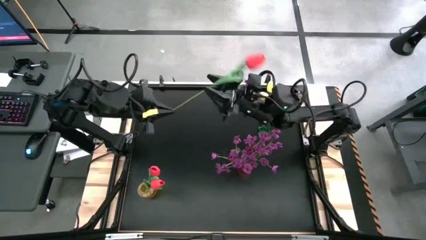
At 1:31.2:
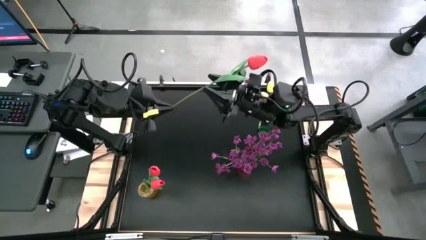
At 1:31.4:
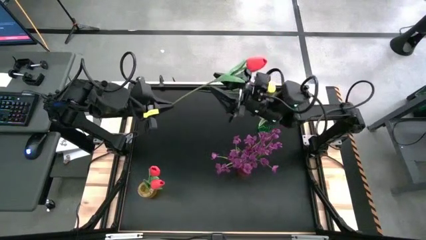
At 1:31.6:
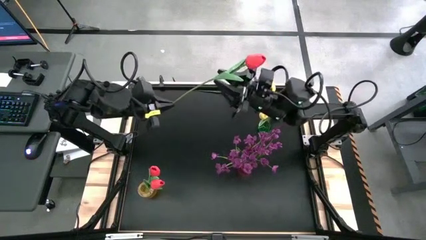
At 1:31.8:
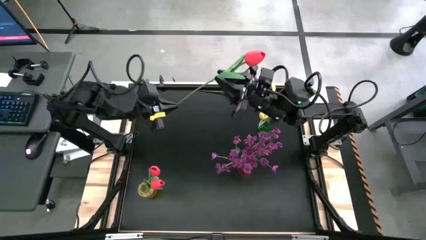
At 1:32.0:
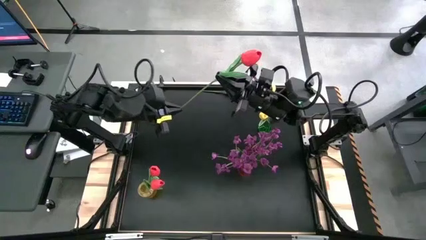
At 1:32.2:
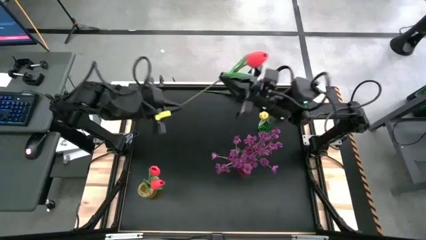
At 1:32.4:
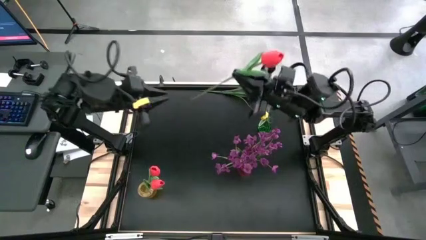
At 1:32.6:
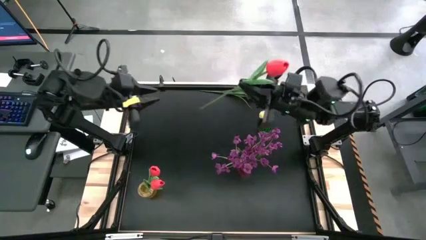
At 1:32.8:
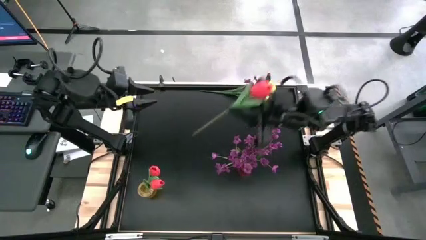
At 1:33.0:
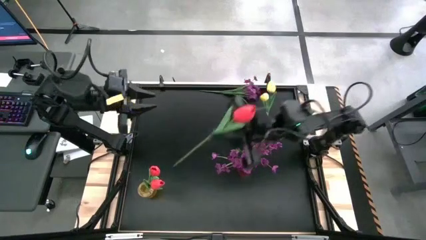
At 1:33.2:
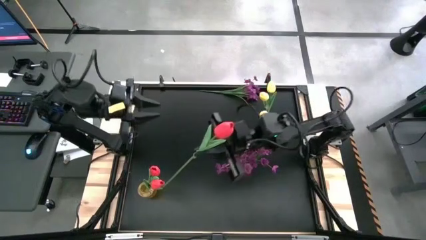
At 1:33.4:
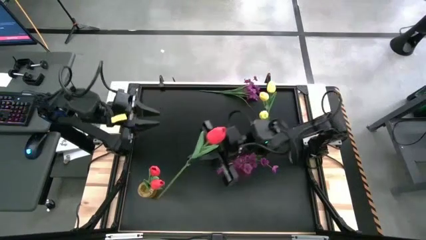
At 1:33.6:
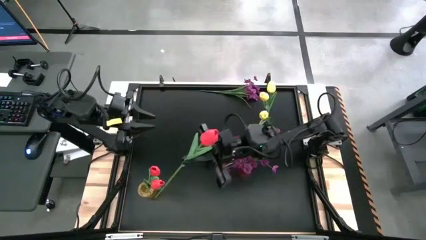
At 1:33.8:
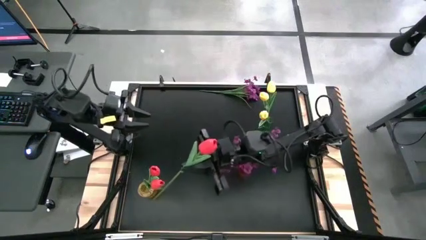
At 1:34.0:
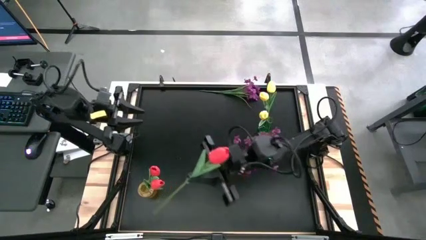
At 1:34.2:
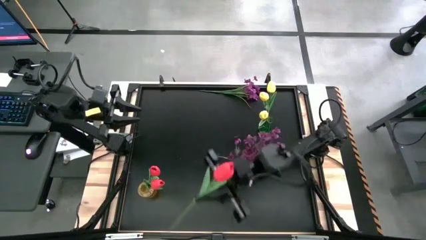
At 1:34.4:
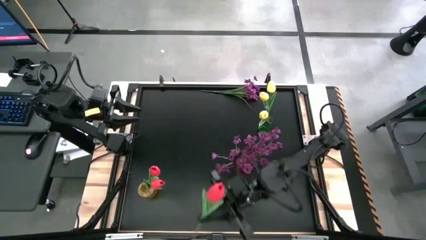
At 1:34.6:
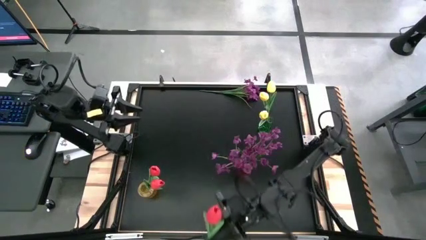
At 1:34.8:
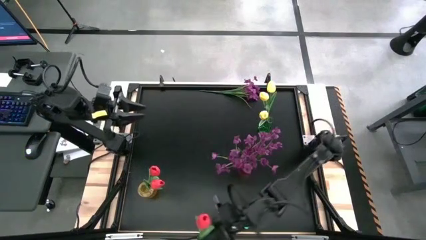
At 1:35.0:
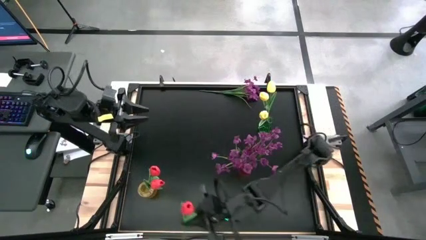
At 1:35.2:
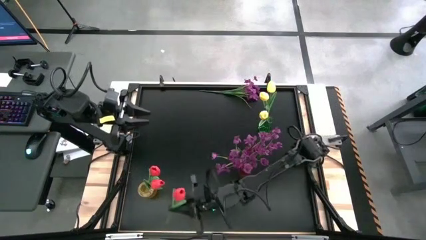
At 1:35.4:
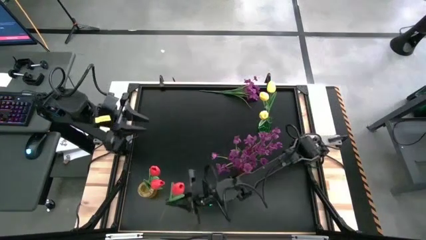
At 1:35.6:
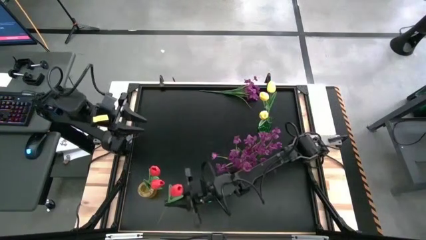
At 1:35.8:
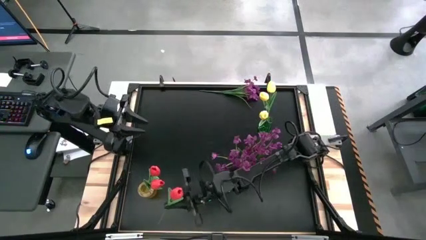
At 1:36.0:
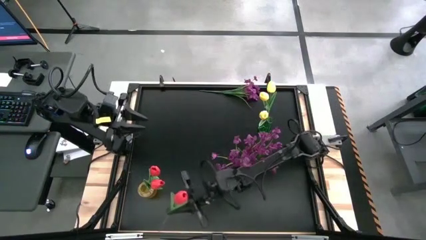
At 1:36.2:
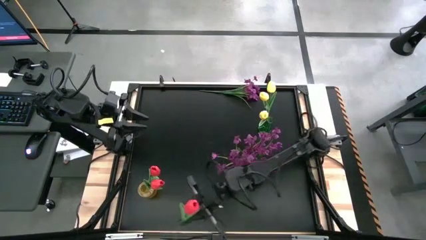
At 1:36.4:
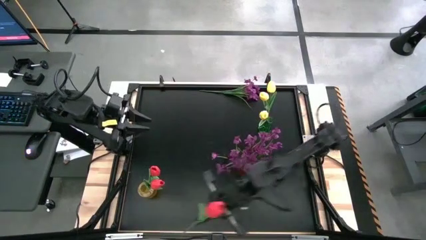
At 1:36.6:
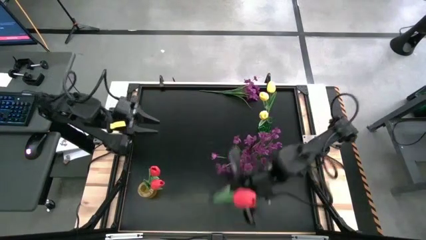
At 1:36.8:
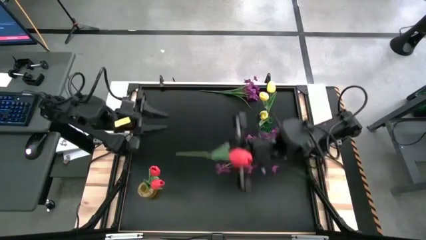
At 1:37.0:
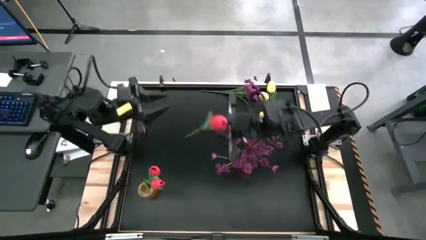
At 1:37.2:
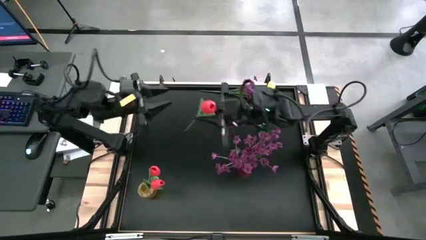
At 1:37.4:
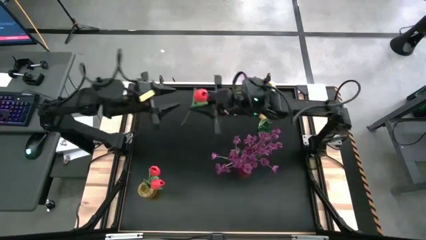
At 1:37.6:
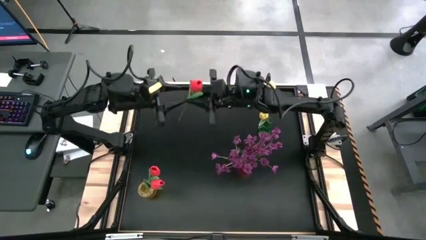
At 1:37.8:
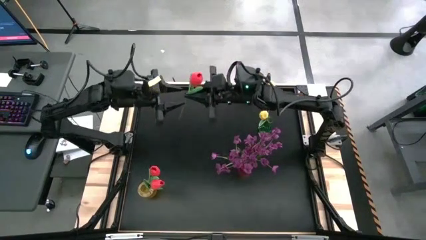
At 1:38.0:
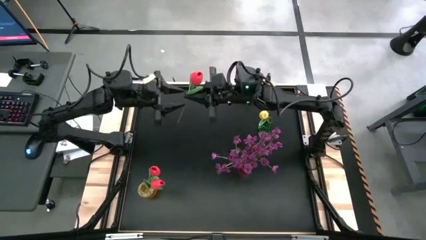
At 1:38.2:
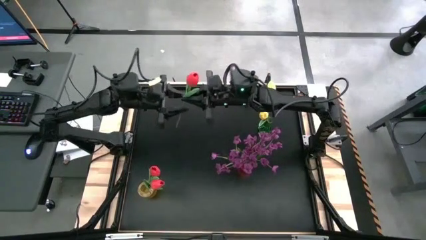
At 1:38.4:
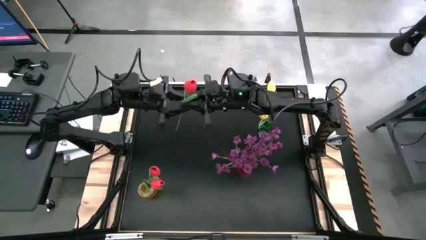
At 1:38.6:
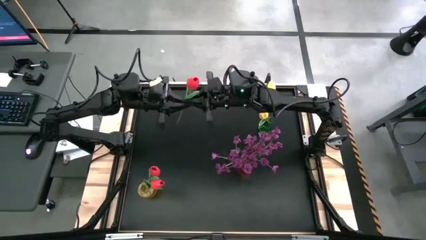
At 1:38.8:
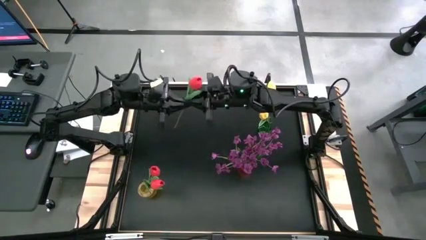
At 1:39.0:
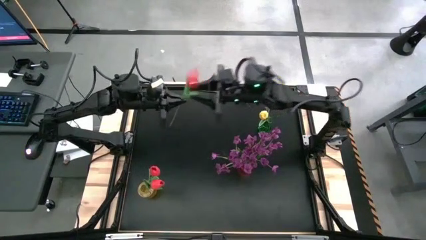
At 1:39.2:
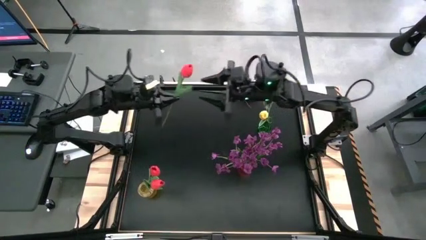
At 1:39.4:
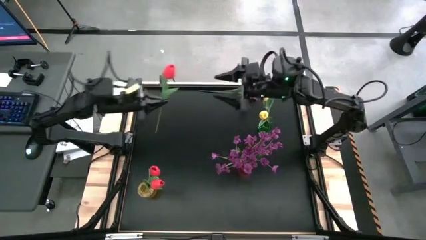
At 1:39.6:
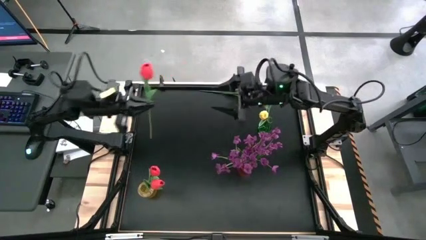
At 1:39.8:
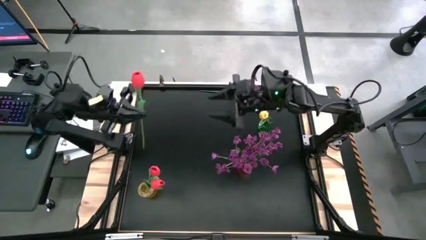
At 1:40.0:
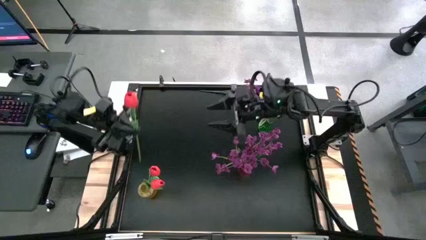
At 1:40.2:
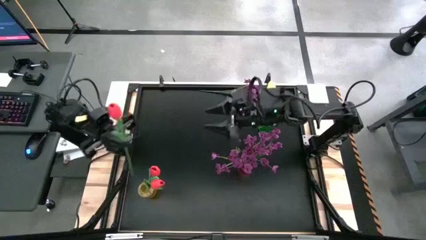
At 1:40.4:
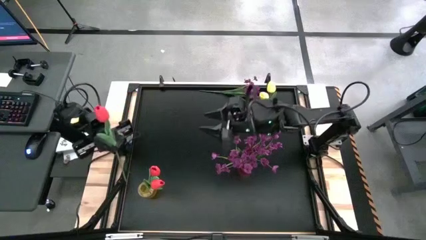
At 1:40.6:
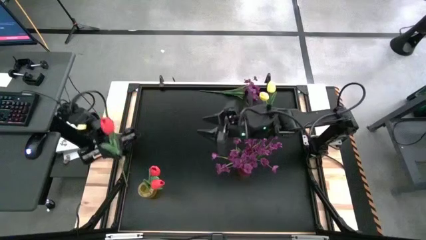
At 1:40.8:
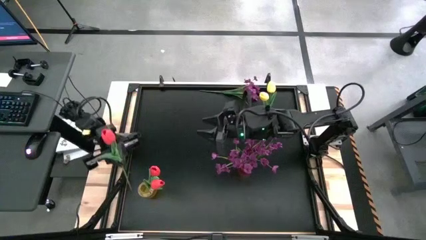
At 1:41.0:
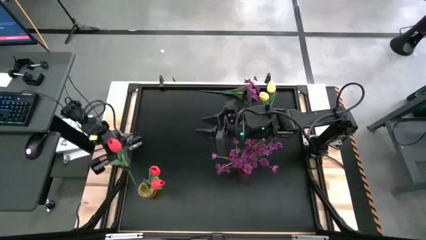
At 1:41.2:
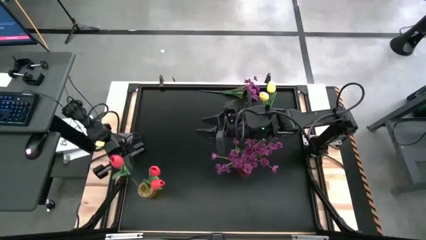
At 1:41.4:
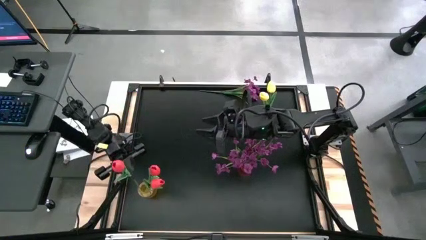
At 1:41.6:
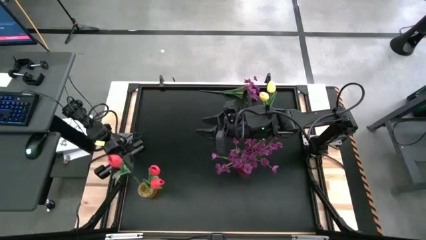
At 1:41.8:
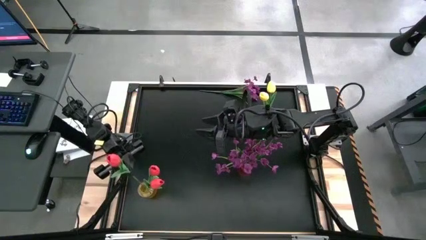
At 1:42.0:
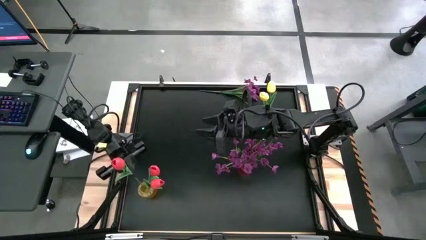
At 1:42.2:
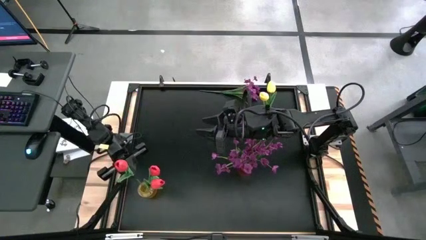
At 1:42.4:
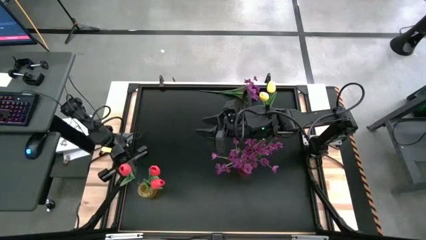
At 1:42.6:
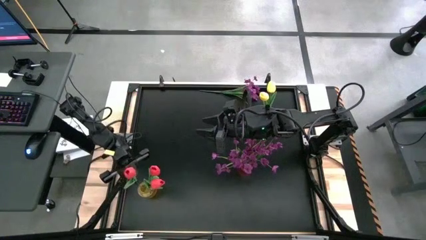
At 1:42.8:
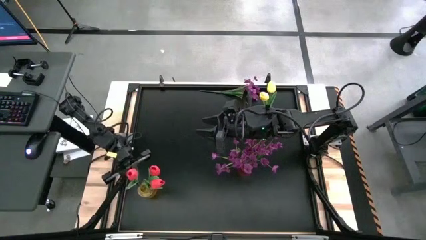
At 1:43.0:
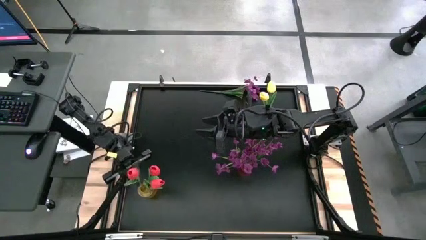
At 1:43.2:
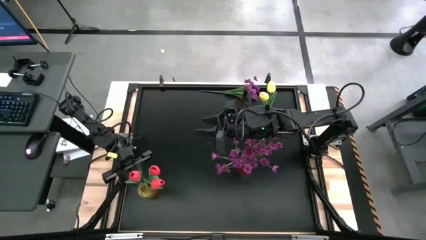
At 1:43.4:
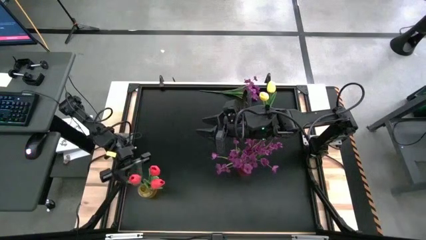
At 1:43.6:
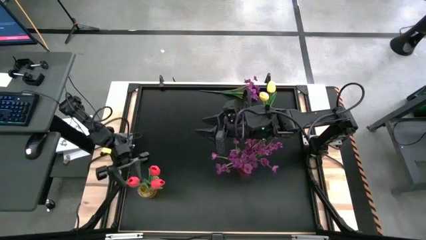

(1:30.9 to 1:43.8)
Task: Sort flowers into vase by color
Put the pink tulip into the yellow flower vase
